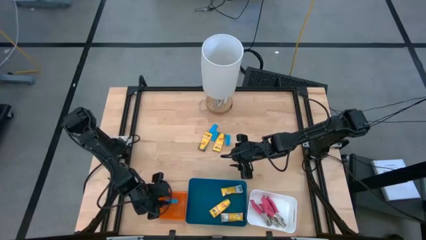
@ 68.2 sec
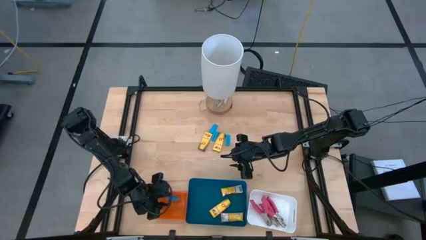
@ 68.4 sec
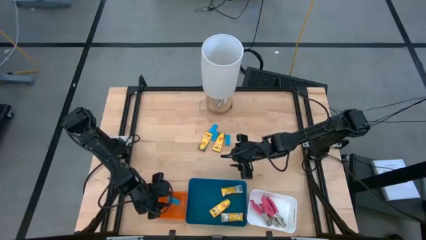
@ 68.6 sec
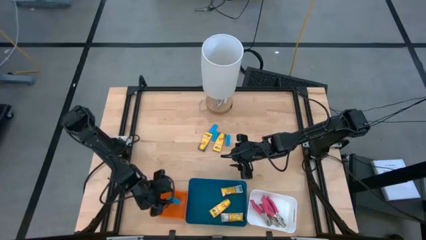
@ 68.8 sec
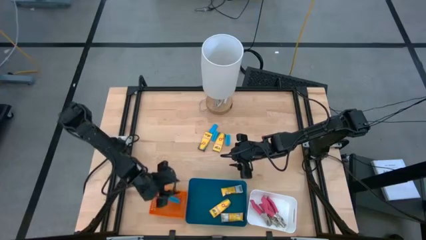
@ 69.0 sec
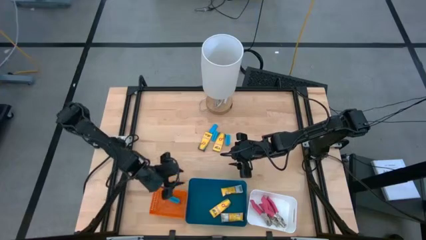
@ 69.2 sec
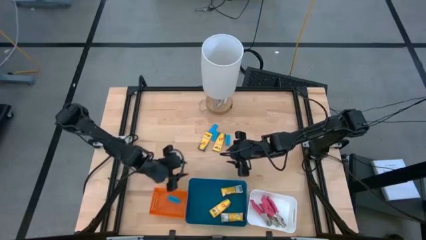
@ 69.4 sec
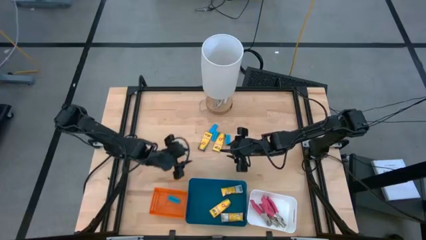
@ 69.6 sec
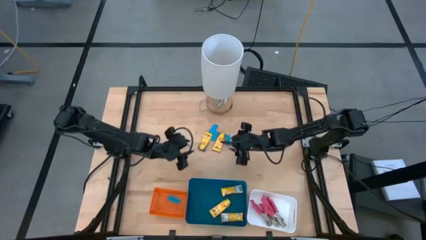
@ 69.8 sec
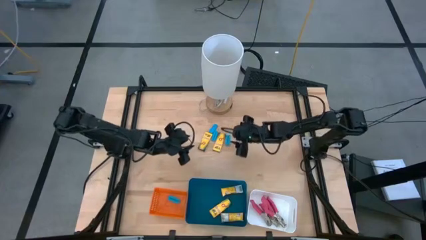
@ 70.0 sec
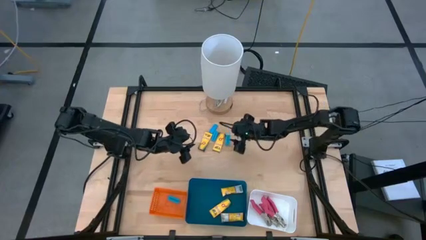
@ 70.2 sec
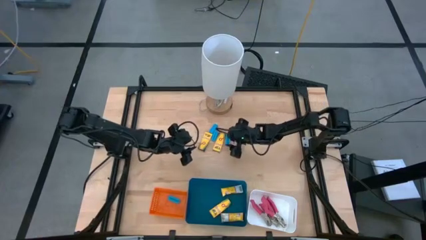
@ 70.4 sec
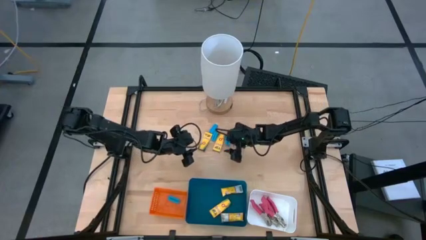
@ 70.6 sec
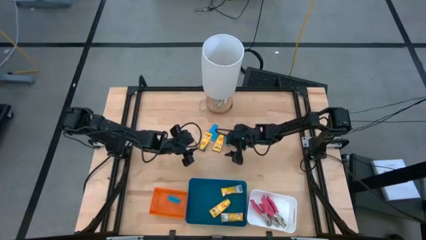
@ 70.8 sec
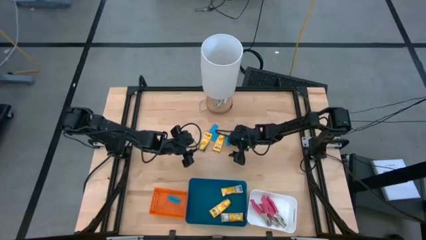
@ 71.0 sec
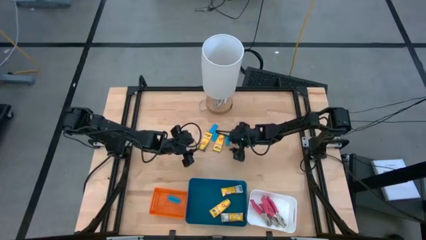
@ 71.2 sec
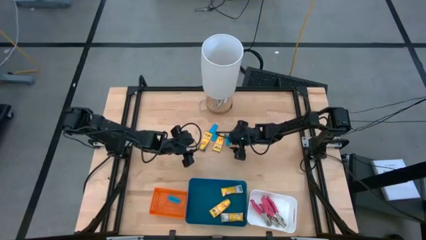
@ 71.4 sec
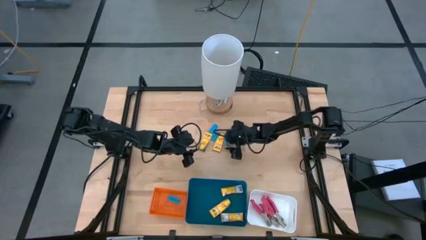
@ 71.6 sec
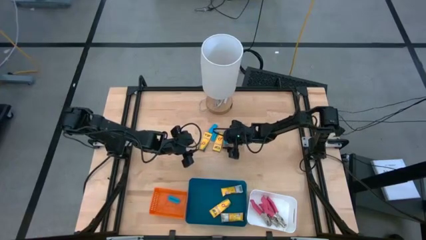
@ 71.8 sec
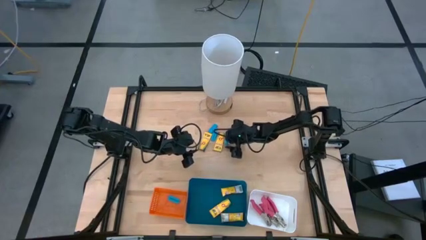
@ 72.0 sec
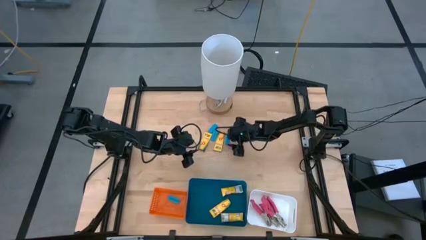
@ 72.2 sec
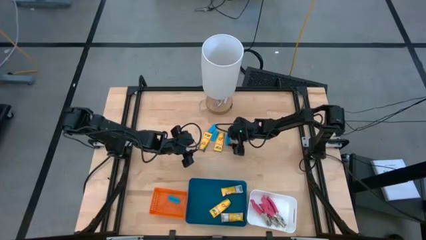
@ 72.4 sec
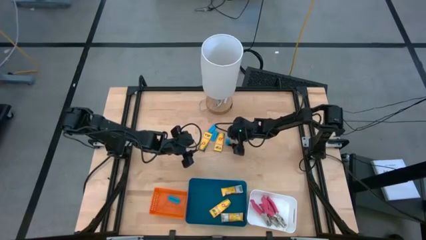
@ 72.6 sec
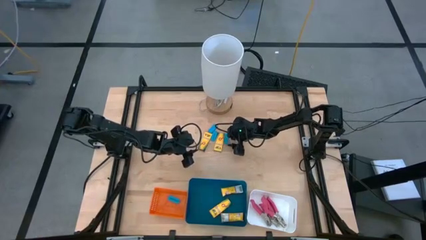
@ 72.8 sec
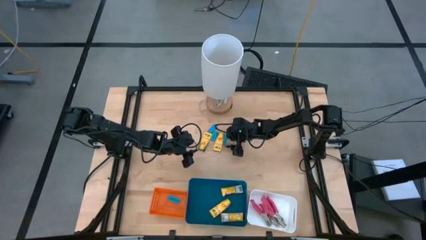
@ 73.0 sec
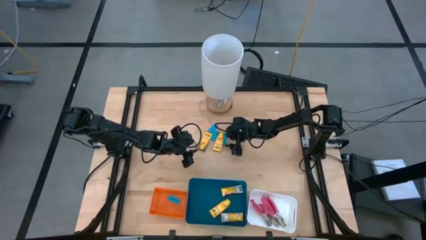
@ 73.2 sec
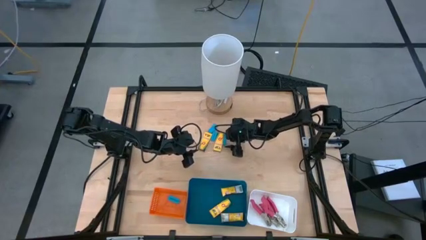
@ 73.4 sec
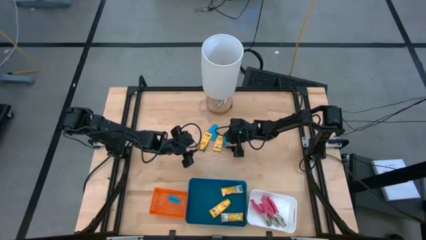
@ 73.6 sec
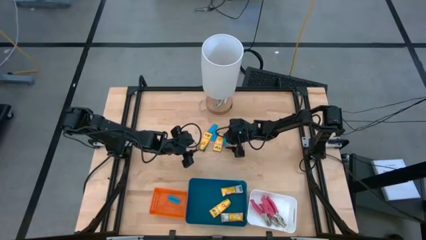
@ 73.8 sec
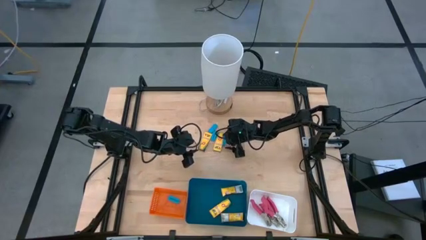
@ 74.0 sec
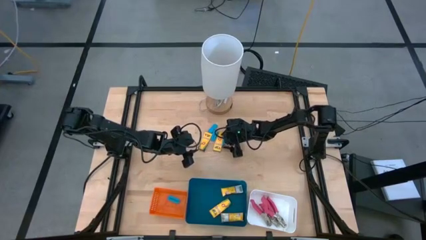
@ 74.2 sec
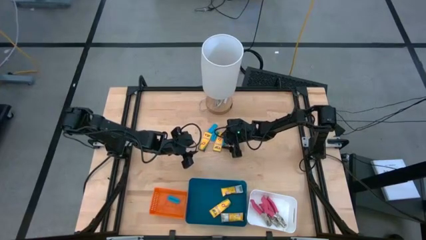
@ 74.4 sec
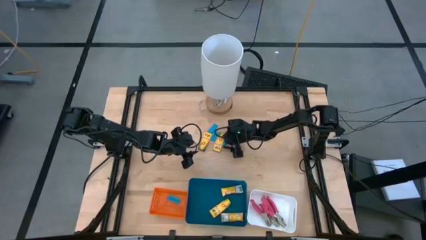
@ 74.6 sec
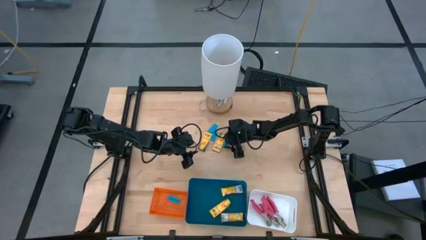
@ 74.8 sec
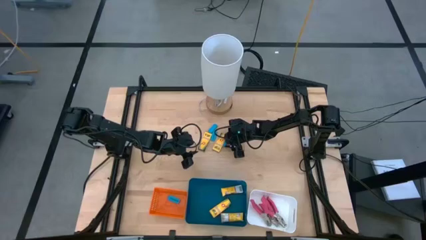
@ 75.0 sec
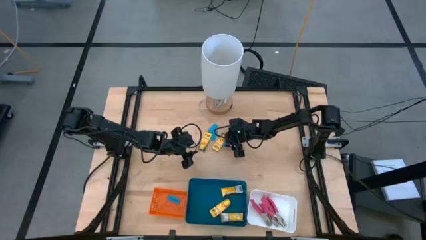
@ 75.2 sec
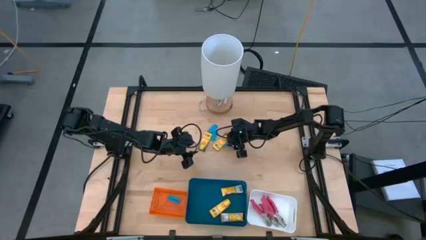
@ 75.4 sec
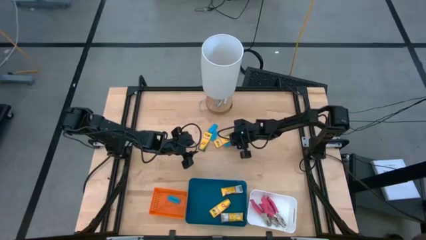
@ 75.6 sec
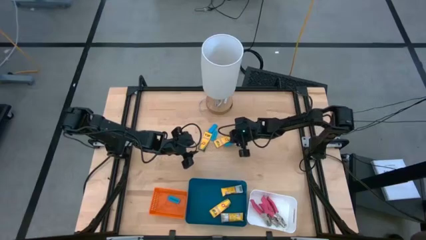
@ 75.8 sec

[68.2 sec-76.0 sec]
Task: Pick & Place School Supplies
Put the blue eraser into the orange bin

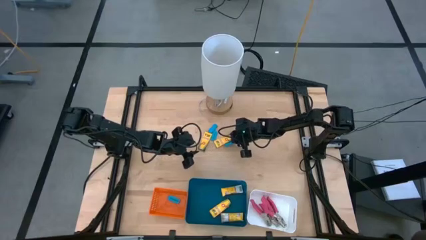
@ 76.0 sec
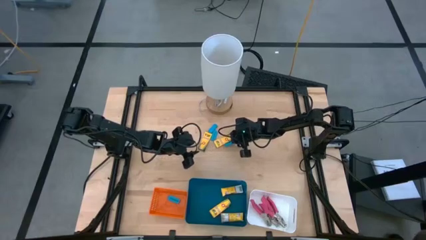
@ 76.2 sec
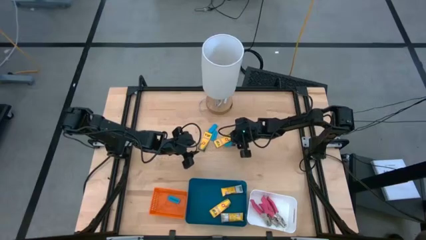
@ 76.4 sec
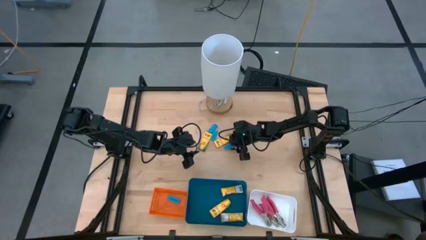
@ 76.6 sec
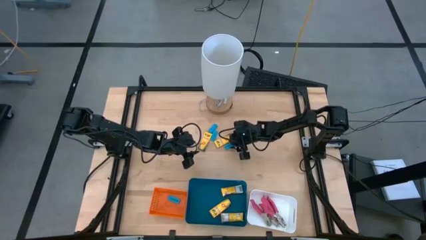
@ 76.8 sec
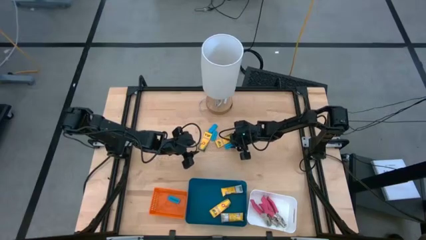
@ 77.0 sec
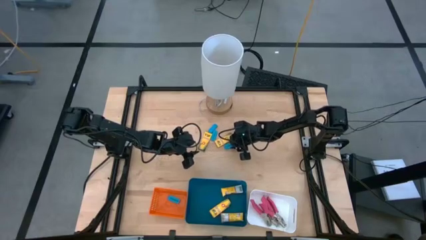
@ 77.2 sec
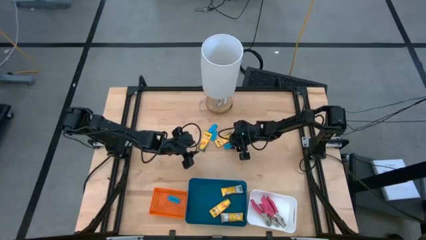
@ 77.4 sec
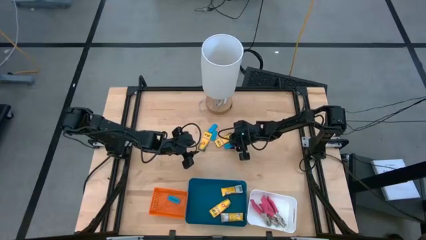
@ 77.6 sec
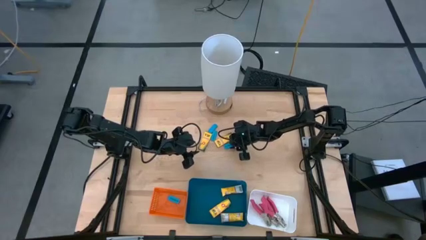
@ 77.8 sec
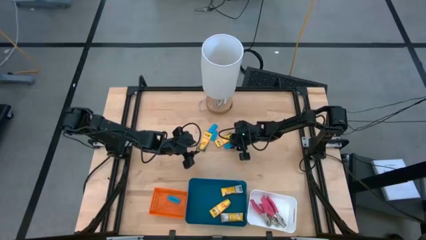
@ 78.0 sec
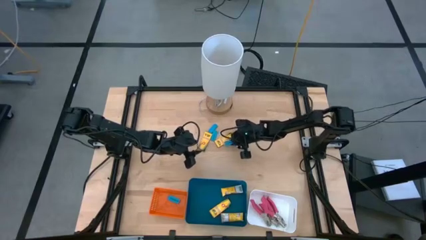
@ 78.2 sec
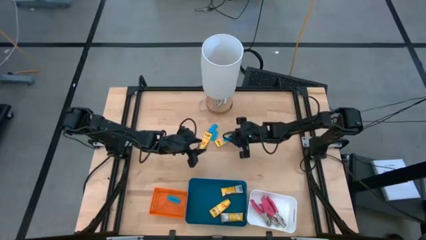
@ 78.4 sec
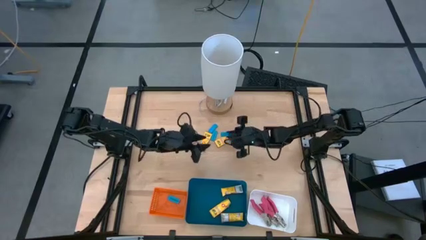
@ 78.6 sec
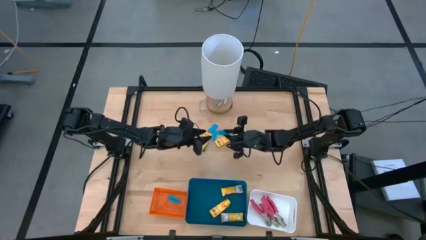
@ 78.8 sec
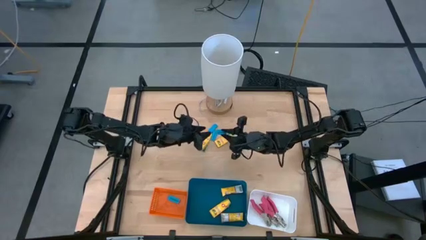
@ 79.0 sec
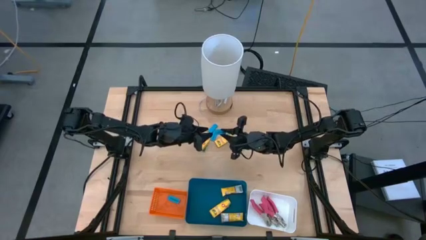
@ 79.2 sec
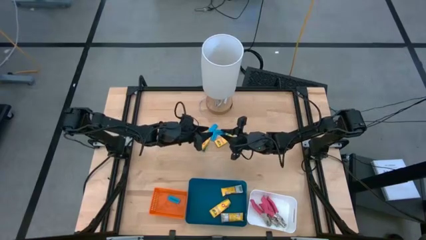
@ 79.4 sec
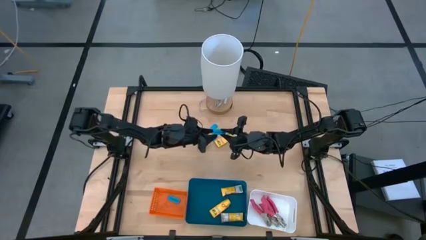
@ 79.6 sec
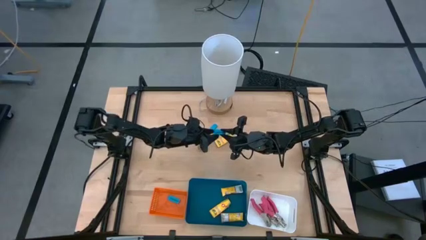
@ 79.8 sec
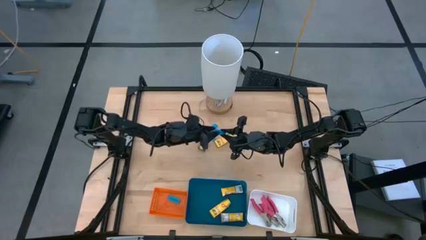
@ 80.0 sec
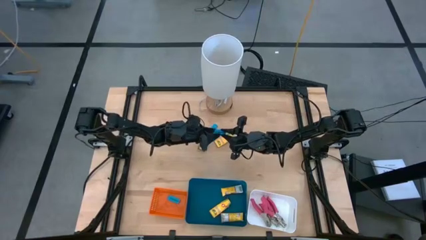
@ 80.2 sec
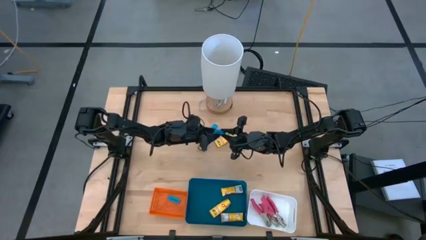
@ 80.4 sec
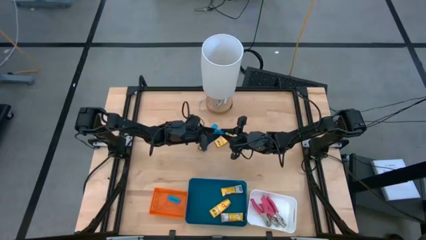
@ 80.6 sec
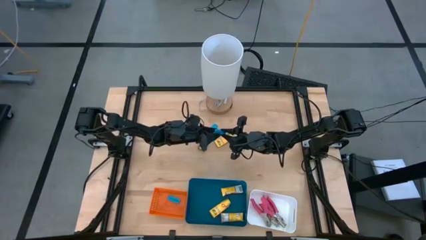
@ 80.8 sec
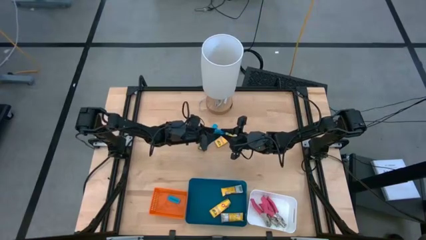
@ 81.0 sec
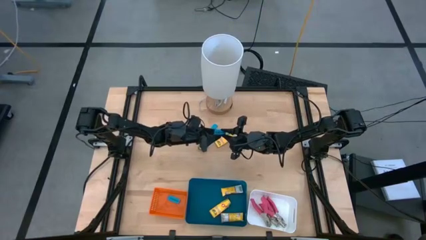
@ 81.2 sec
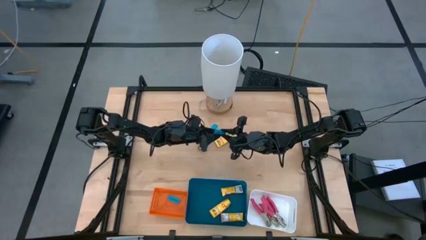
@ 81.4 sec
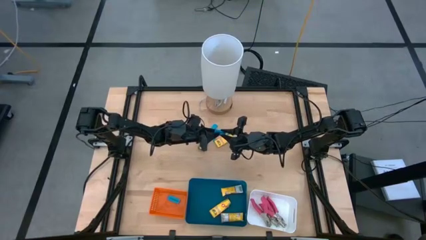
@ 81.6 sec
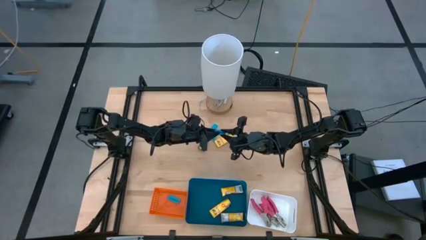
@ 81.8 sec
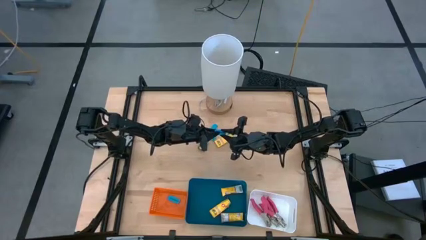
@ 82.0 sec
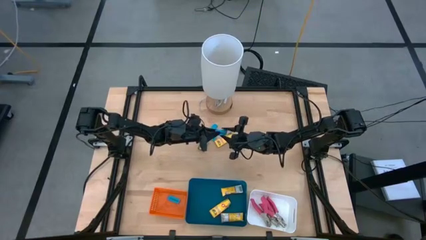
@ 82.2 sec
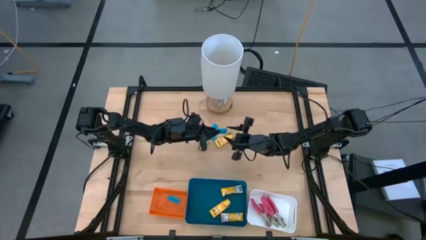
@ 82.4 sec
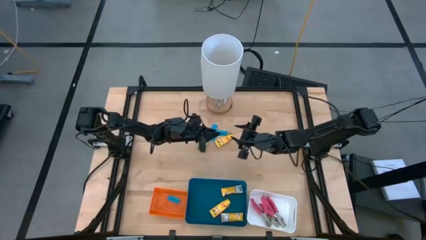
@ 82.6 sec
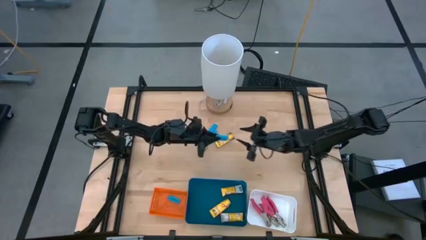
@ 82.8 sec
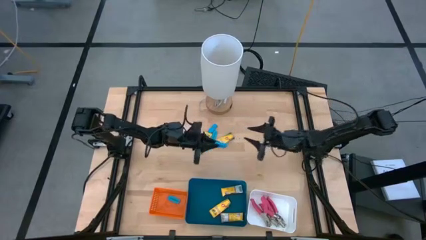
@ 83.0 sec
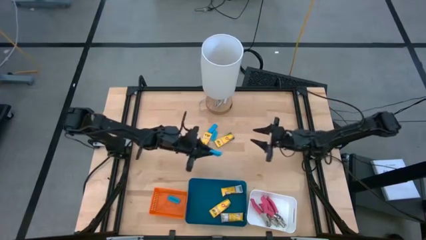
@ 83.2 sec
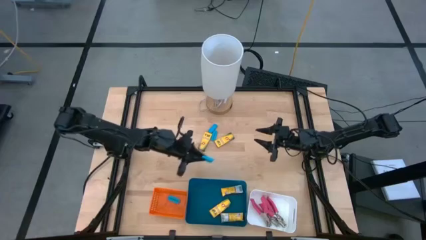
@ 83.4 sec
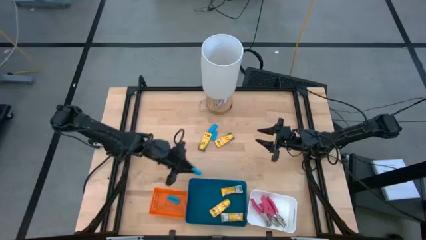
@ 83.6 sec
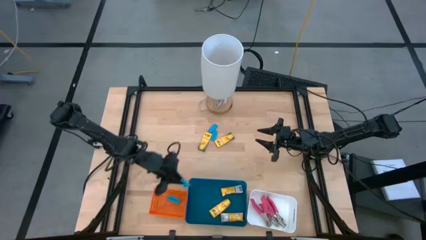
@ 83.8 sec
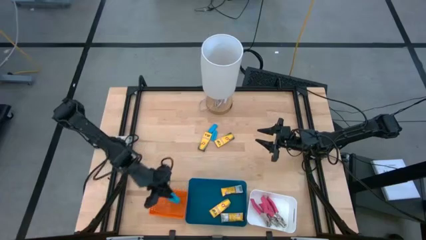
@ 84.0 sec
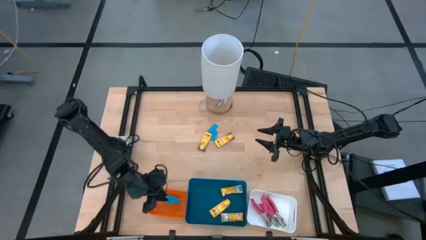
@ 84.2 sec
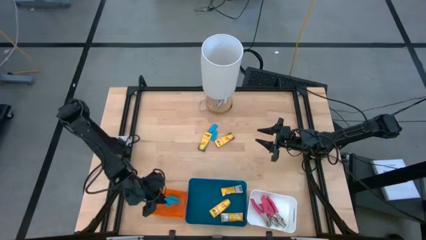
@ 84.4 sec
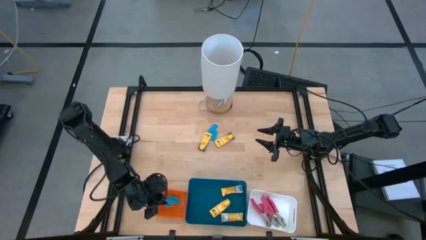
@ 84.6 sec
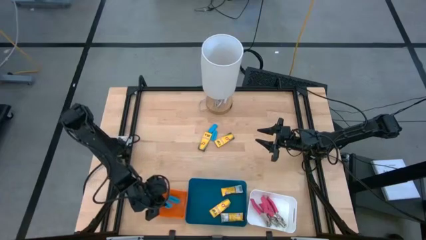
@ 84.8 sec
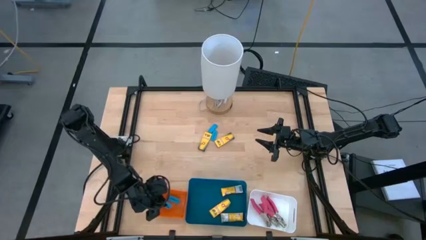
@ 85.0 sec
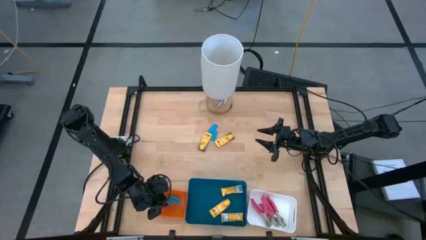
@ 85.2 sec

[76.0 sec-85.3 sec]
Put the blue eraser into the orange bin
